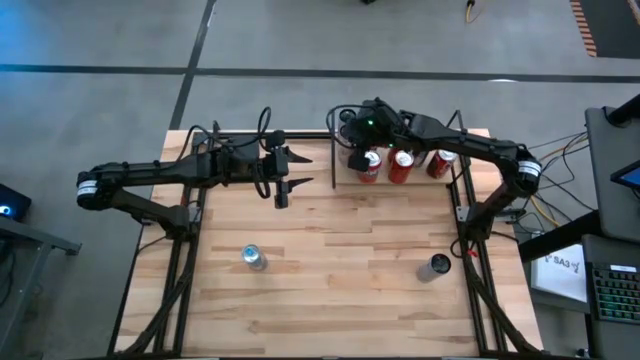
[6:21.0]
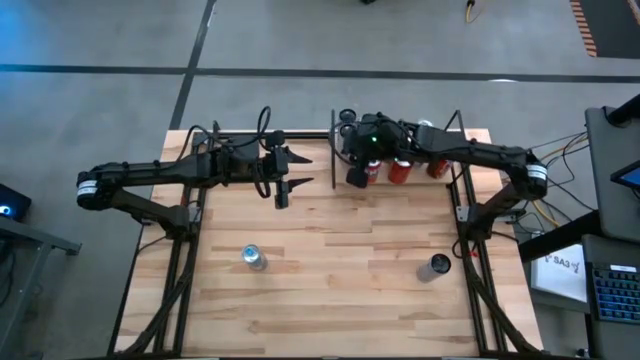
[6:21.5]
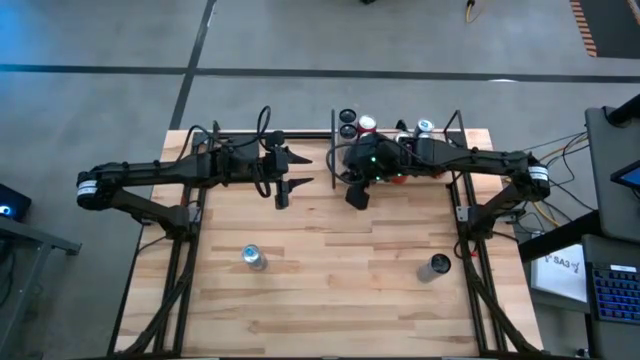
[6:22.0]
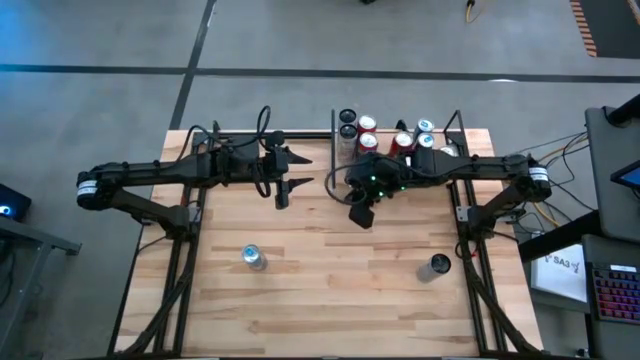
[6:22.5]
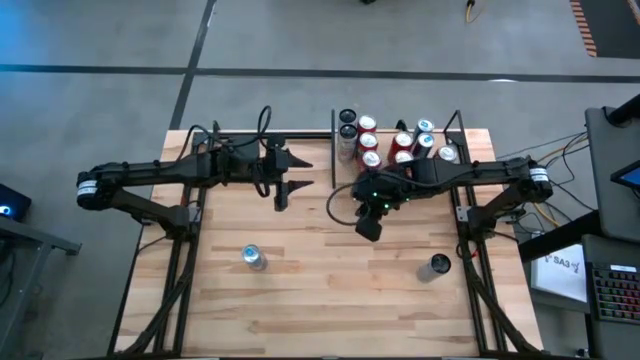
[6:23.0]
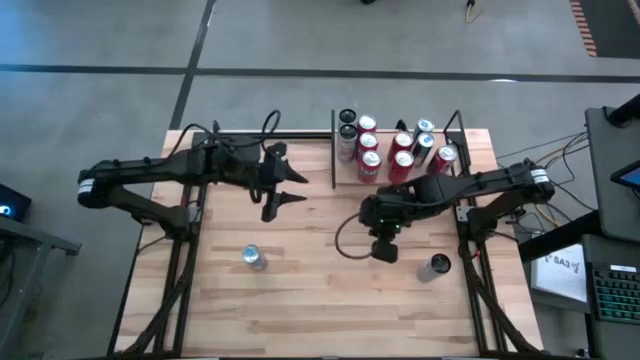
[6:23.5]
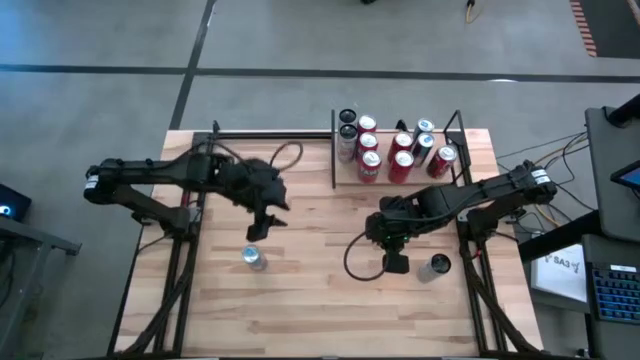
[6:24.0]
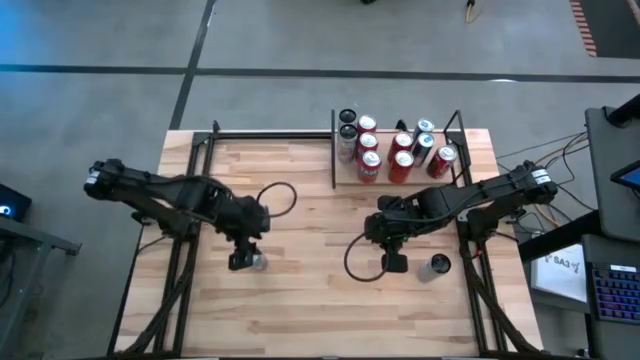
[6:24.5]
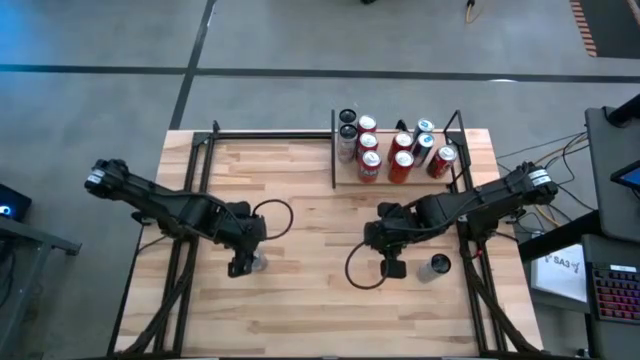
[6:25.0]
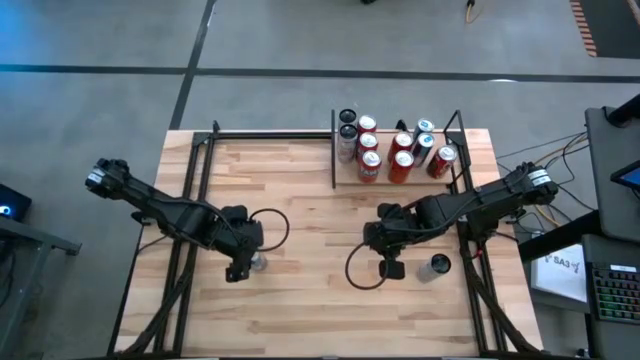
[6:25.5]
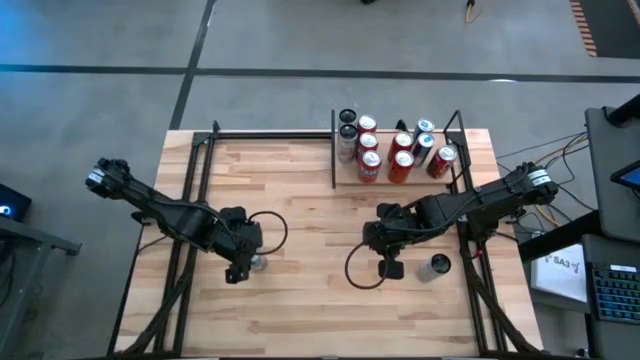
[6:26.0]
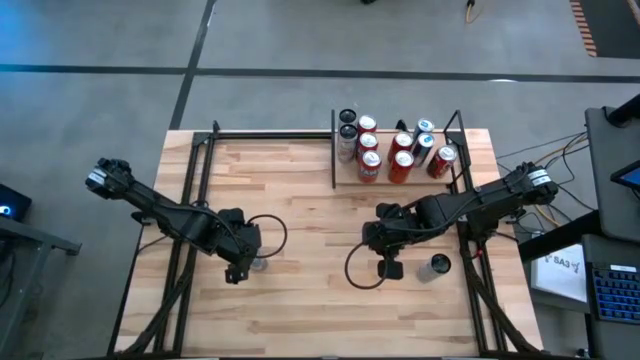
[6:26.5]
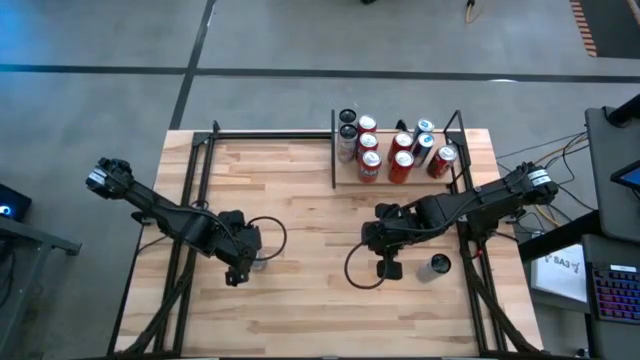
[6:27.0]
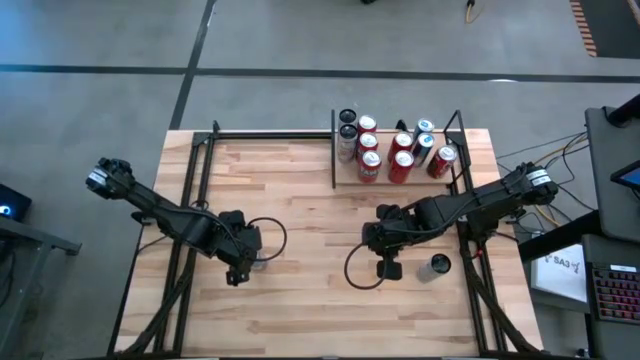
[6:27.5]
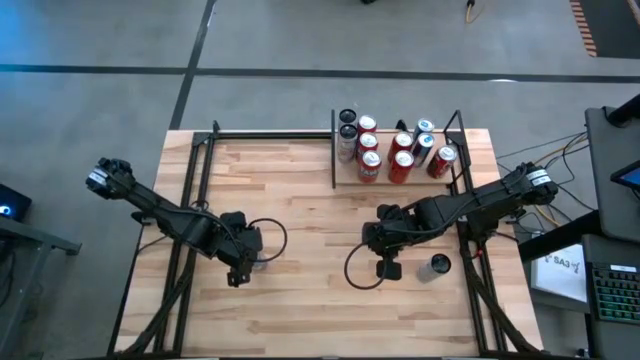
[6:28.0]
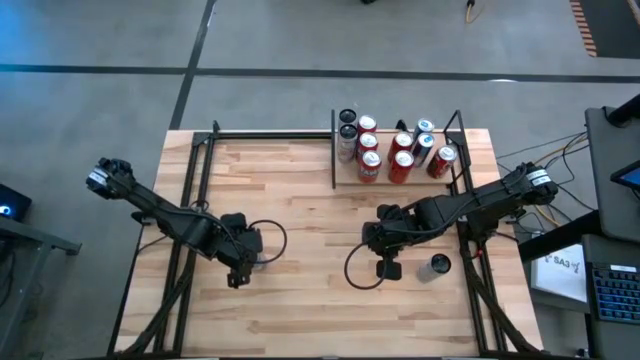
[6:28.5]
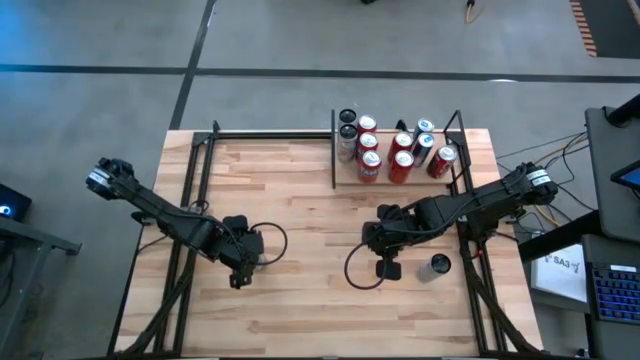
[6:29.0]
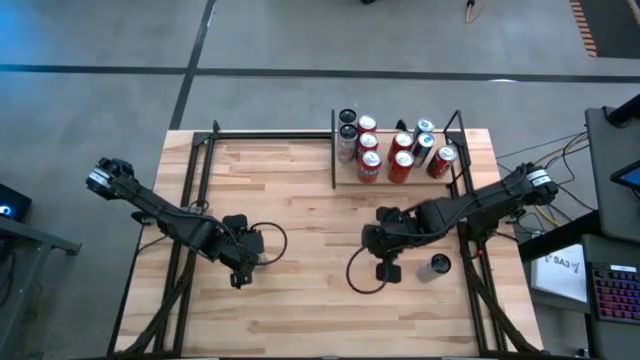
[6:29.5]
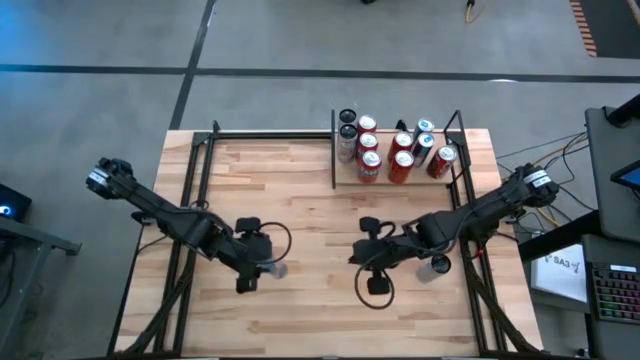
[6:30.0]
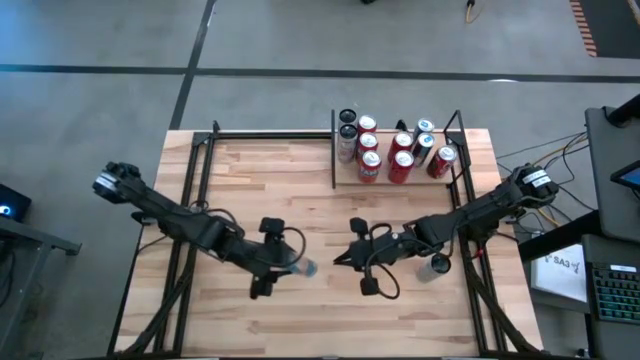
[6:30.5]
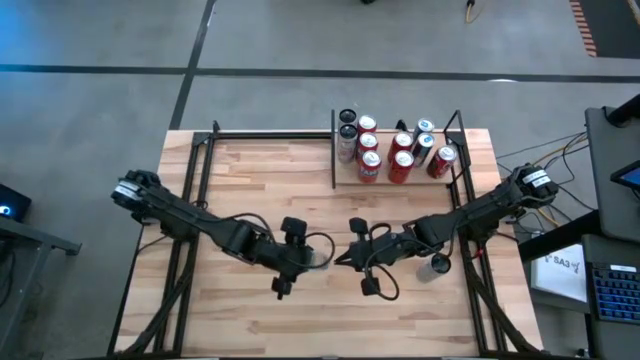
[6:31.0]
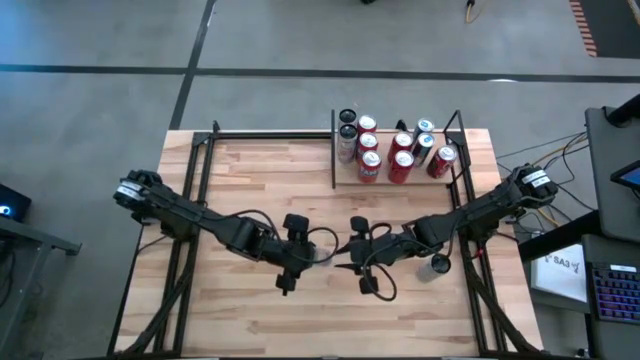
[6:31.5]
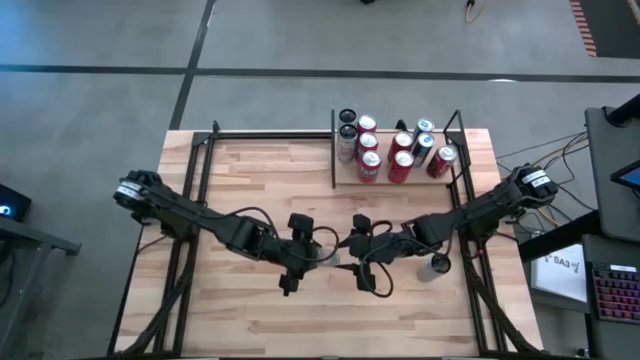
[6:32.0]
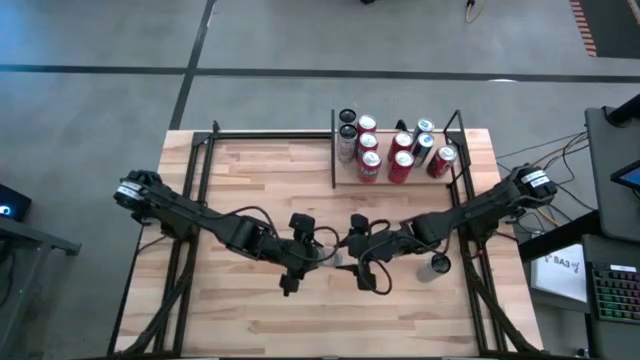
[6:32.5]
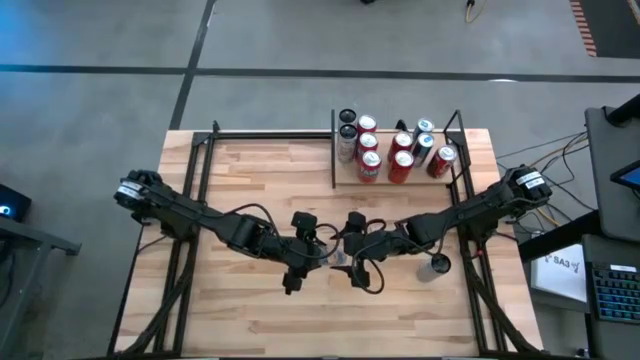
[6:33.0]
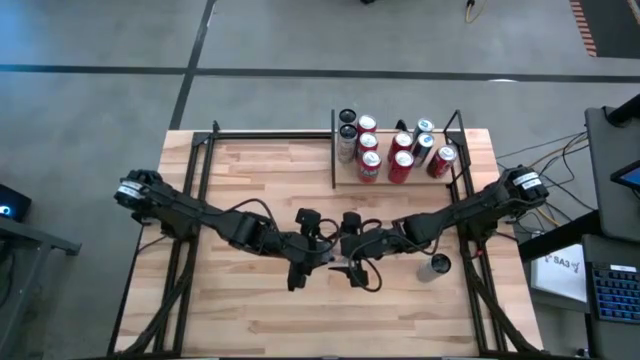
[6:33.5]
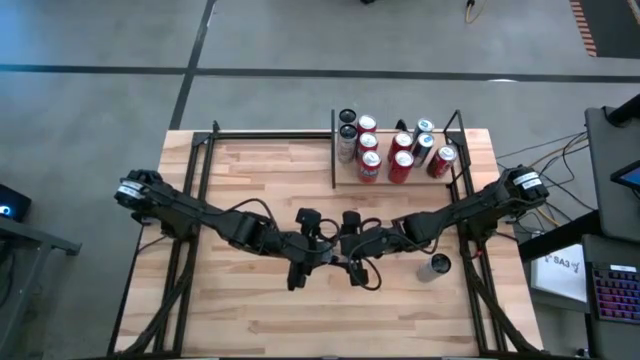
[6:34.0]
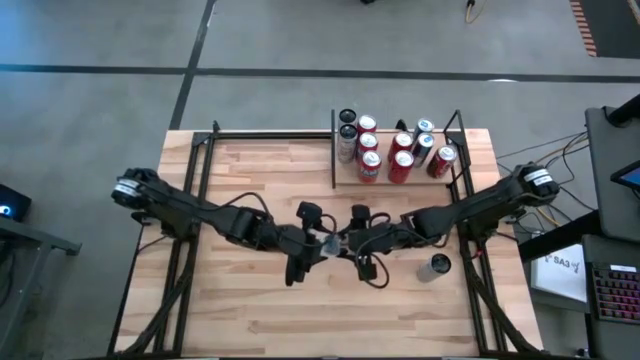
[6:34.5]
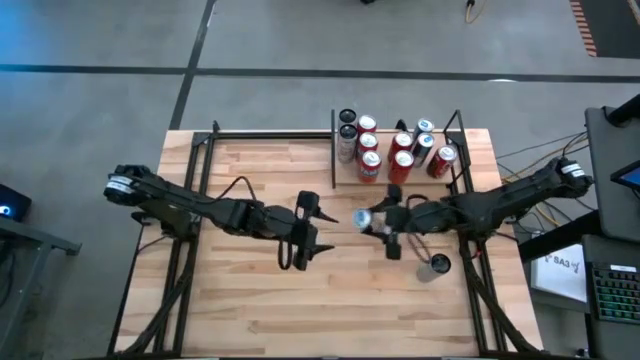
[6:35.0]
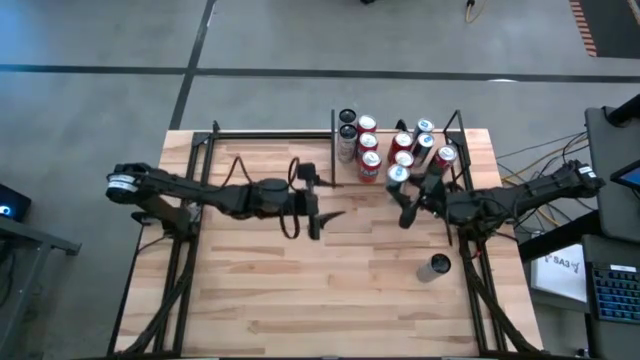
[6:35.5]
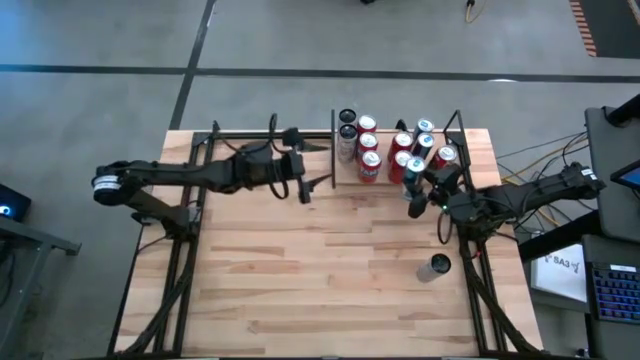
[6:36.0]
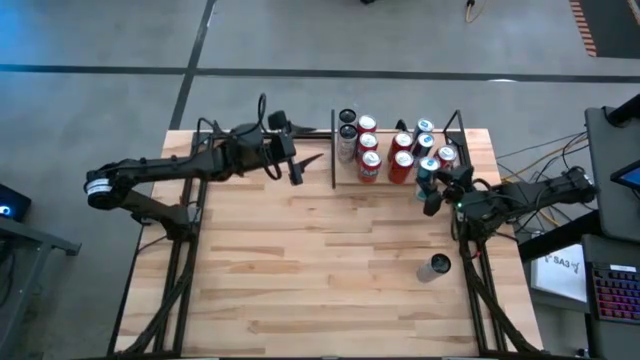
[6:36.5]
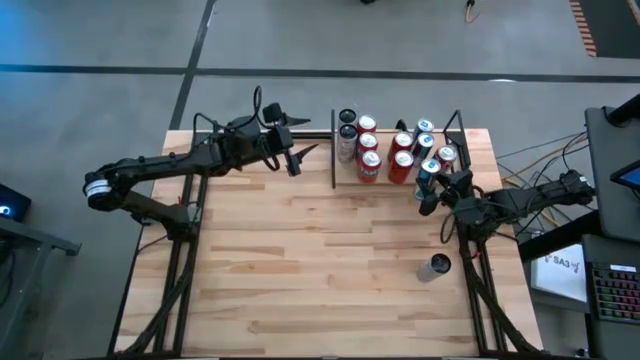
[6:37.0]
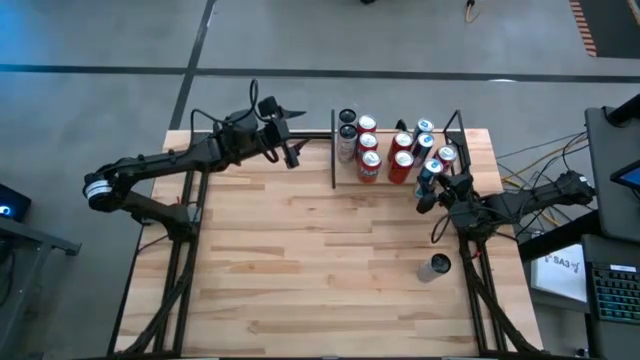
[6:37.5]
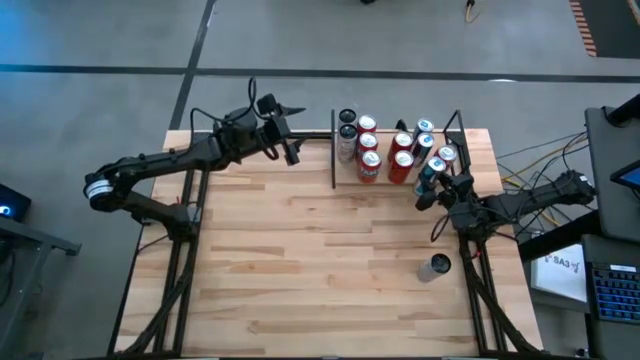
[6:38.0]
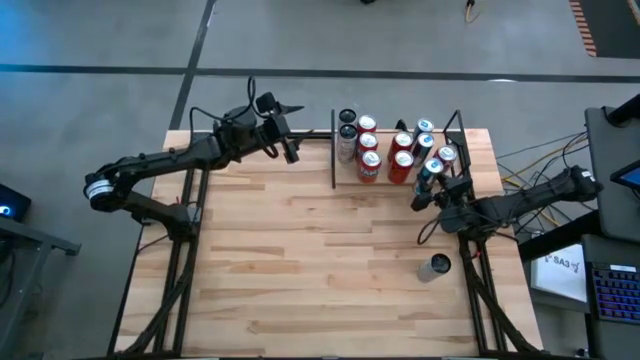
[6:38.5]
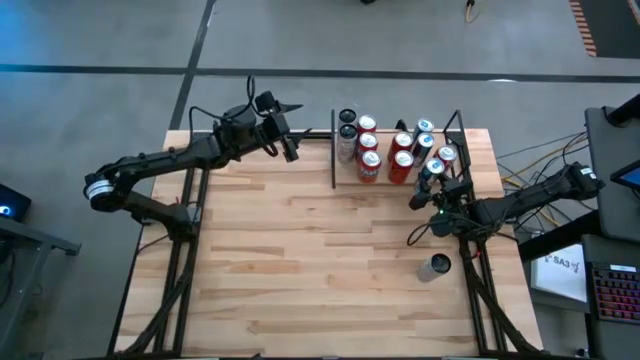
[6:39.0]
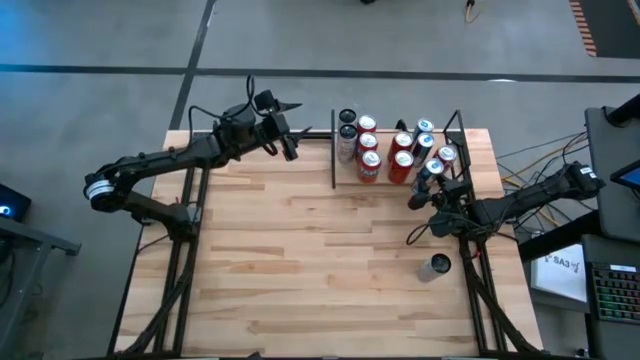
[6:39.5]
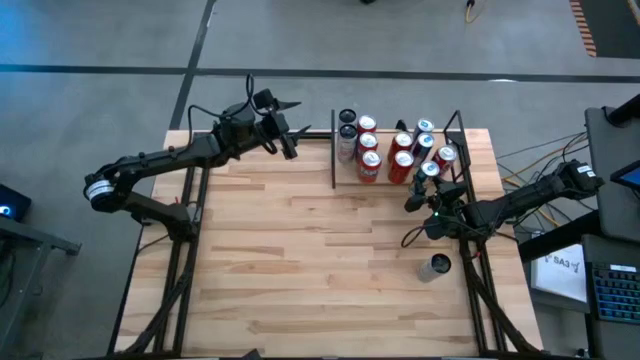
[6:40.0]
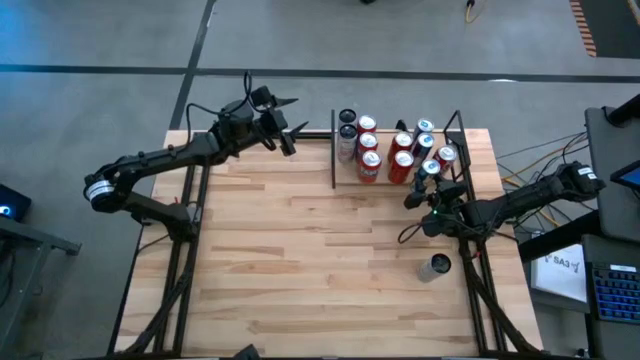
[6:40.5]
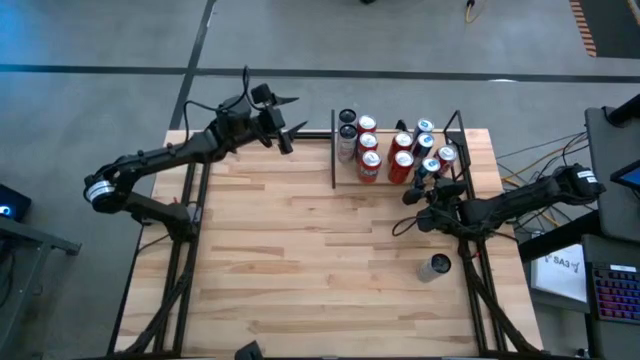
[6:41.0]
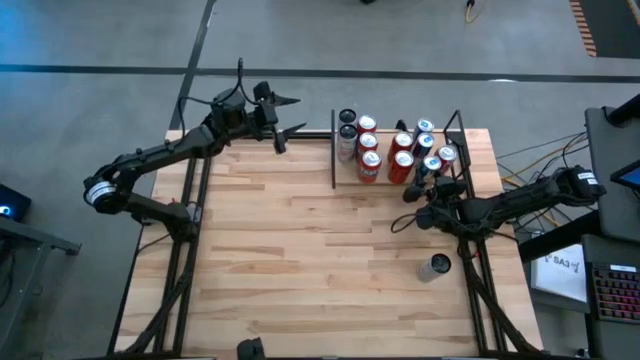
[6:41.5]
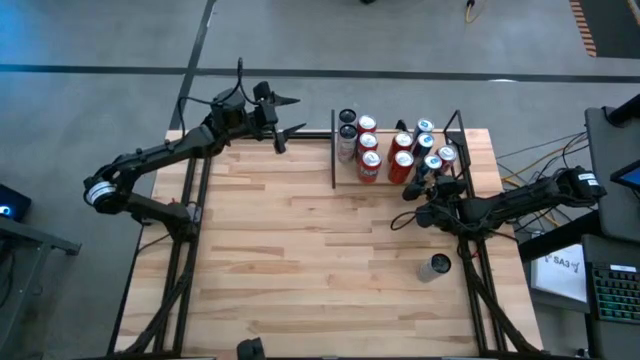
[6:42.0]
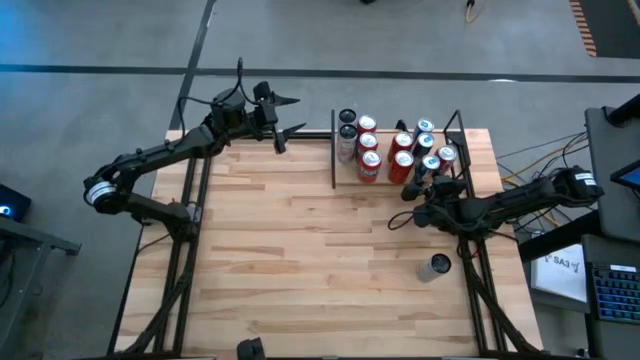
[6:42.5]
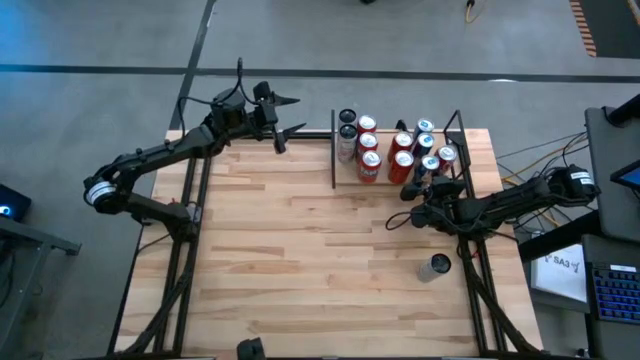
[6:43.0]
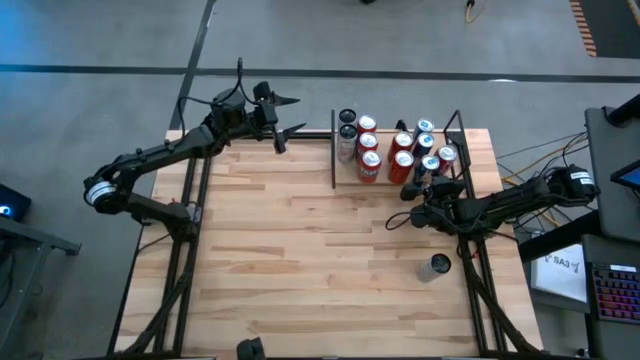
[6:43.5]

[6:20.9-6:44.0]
Task: Place canned beverage on shelf
Put the blue soda can on the shelf aligned with the other blue soda cans

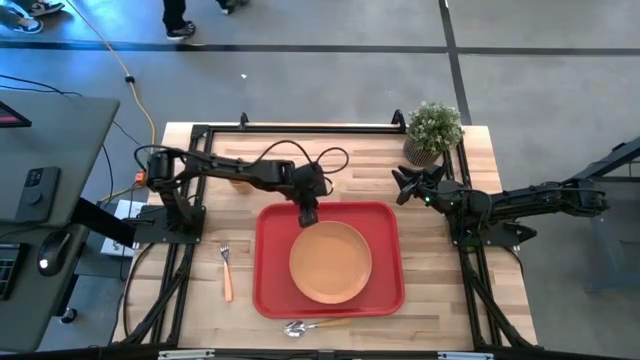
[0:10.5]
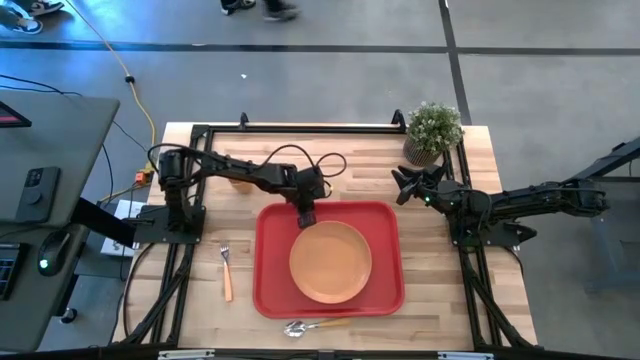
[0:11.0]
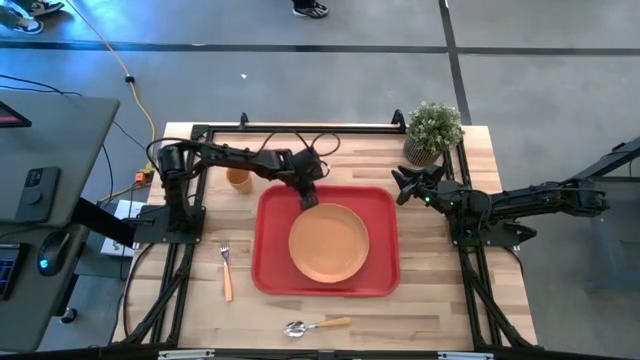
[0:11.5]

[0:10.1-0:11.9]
Task: Pick and place plate/cup/fork/spoon on tray
Adjust the red tray
